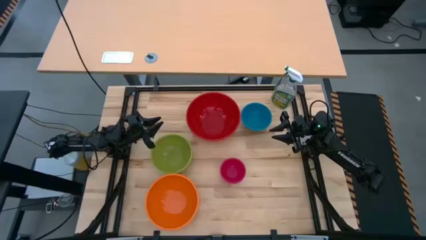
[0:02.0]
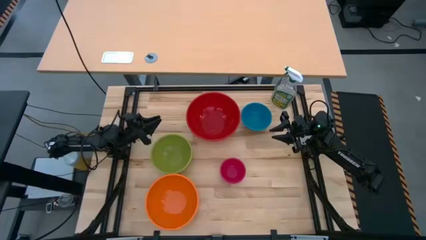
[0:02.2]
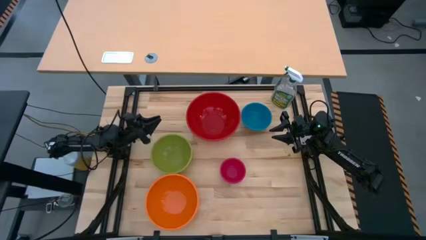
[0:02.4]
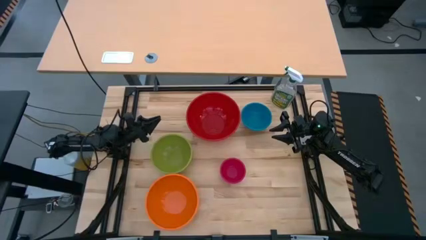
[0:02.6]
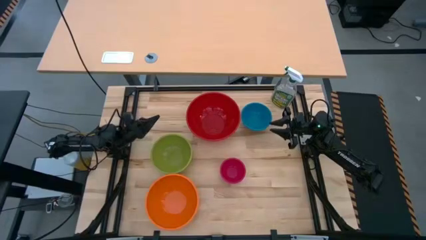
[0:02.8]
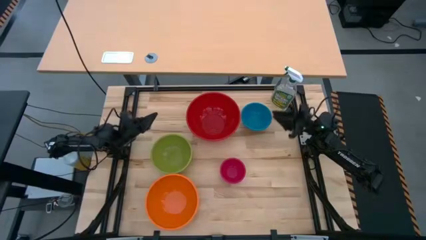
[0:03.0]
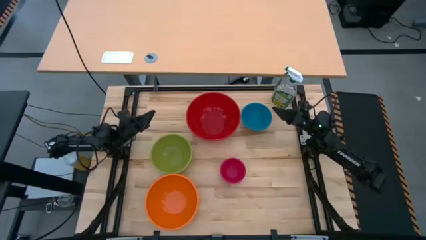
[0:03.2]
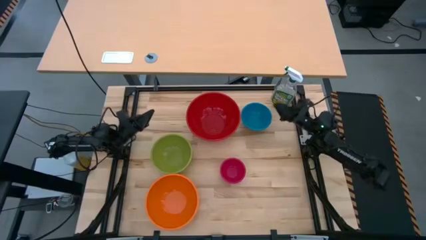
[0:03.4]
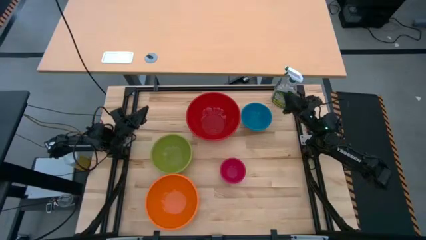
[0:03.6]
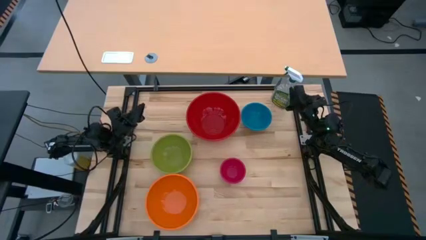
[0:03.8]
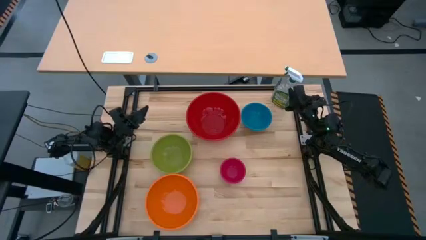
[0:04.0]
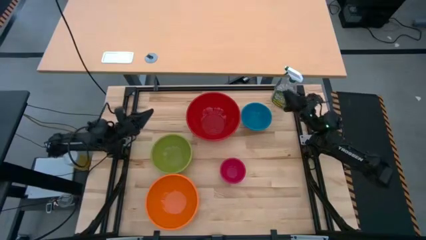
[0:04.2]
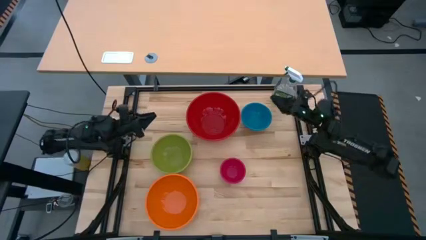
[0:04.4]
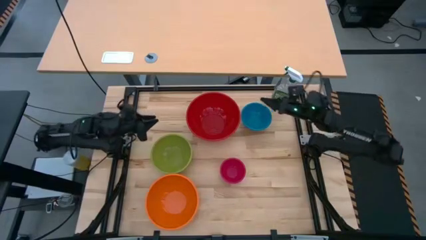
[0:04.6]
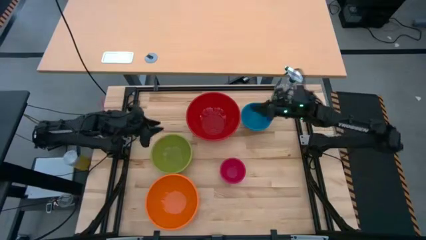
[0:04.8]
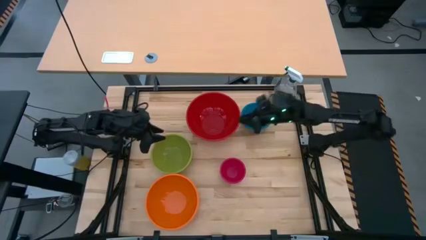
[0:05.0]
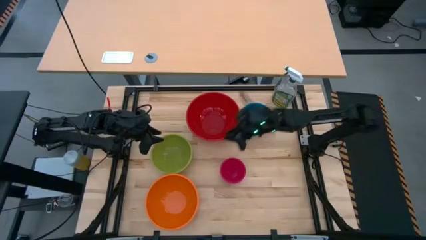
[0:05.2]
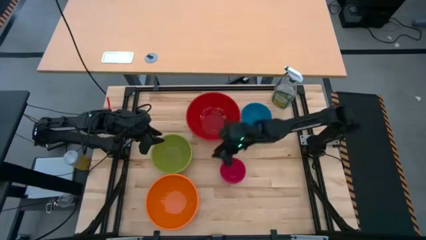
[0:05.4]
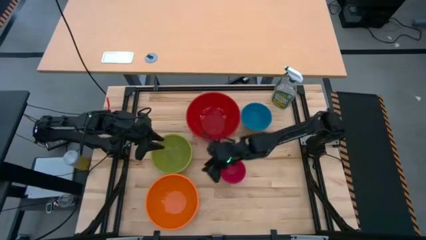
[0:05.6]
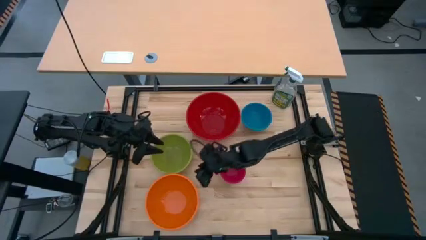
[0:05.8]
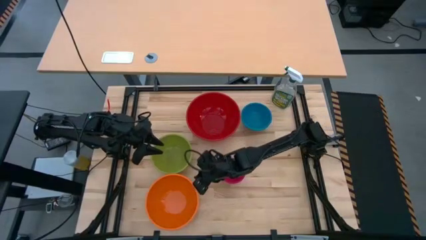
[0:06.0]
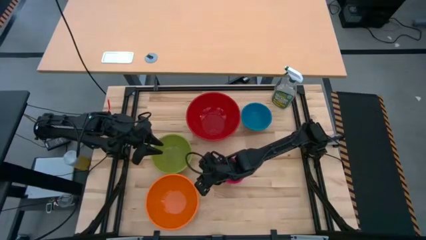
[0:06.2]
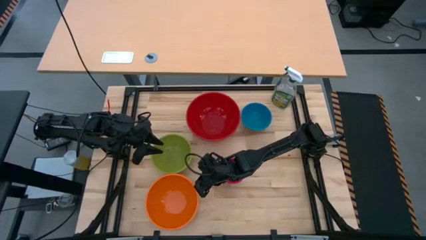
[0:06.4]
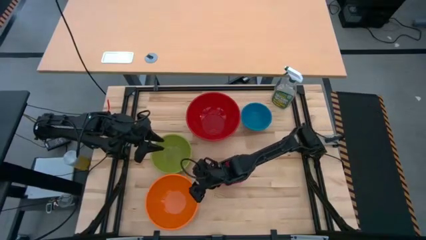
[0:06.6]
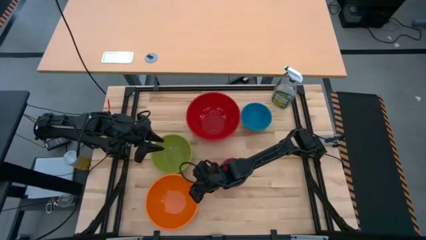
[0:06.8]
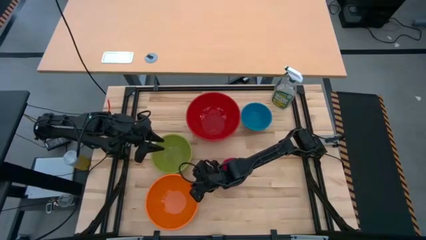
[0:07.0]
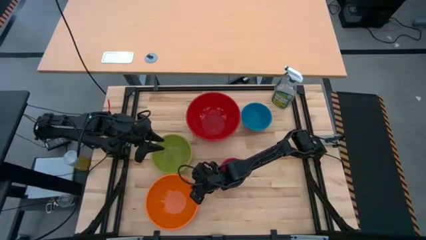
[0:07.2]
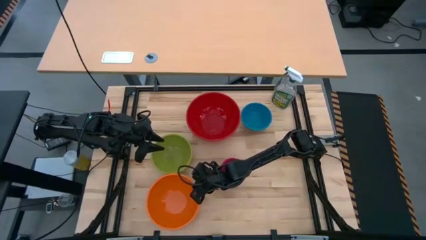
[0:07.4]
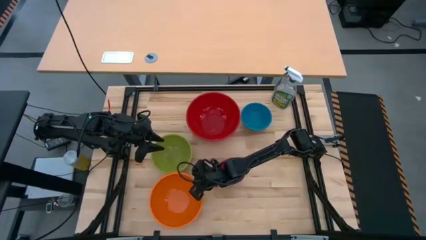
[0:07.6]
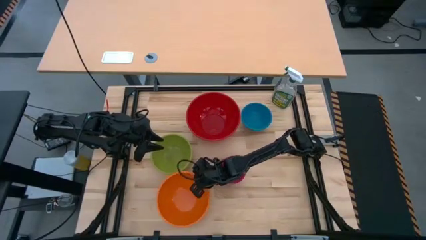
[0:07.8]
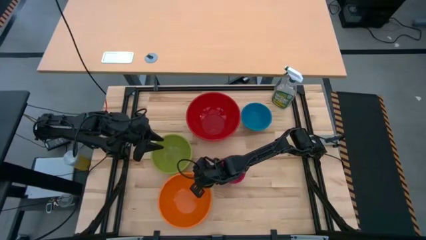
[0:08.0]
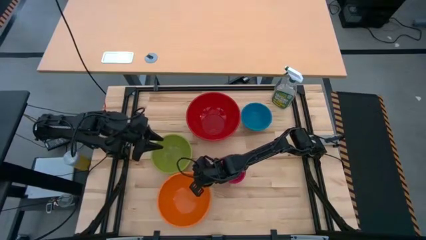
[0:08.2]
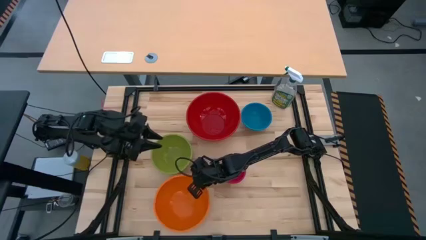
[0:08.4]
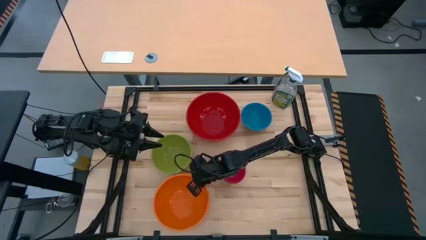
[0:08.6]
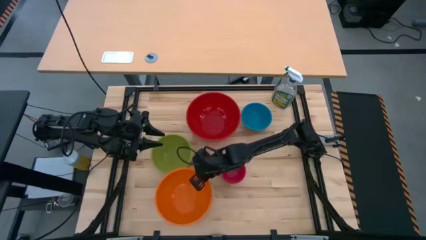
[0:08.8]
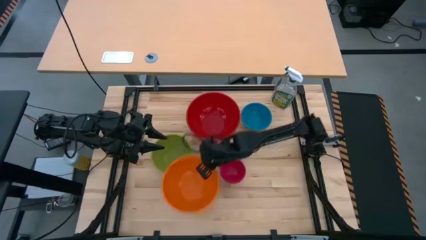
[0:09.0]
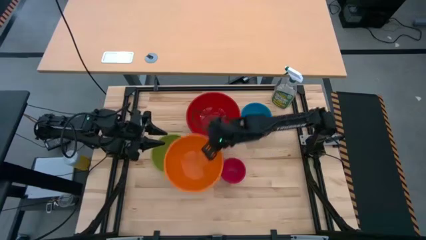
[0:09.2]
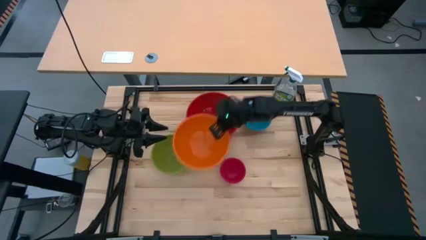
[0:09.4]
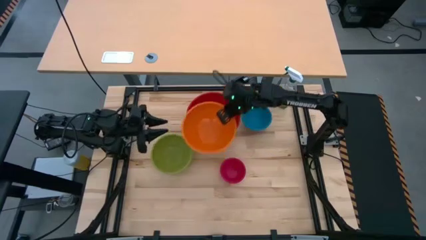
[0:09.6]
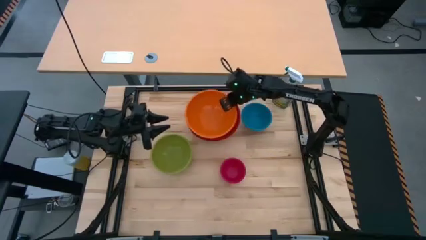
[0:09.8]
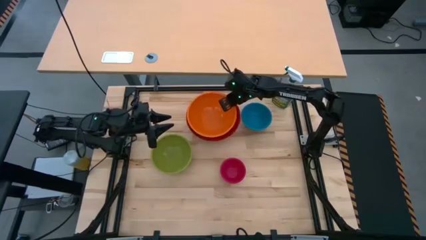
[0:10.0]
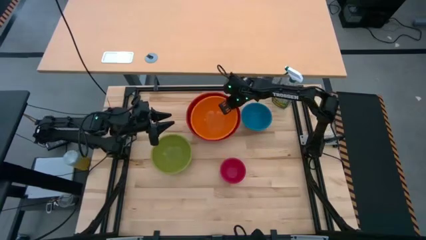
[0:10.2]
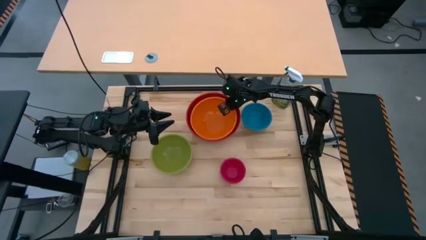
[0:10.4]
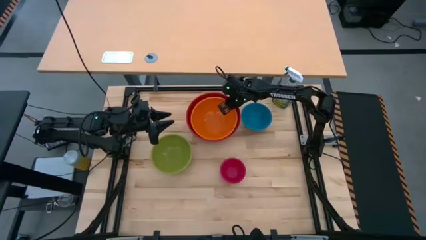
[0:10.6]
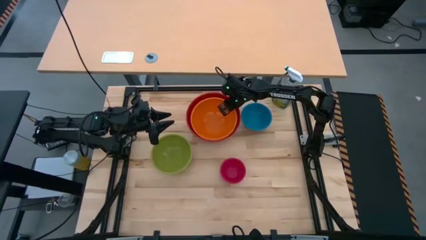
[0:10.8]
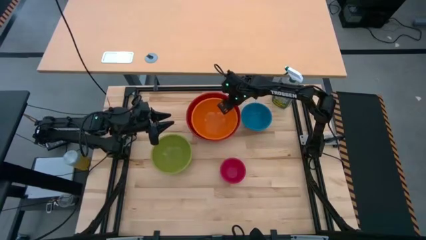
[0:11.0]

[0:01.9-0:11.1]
Stack the orange bowl on top of the red bowl

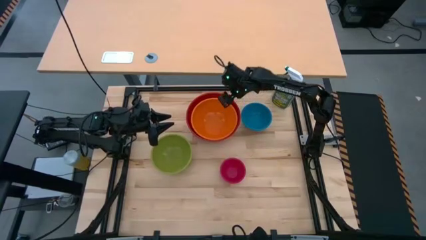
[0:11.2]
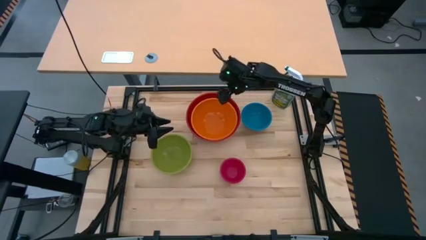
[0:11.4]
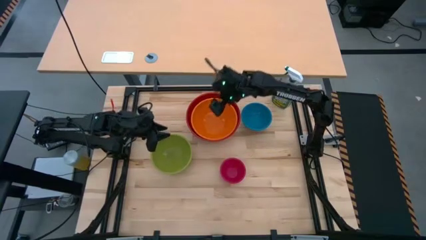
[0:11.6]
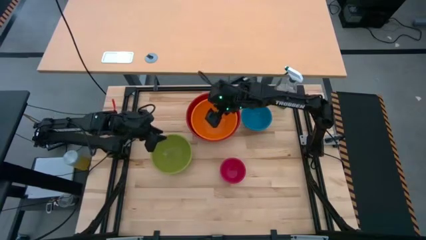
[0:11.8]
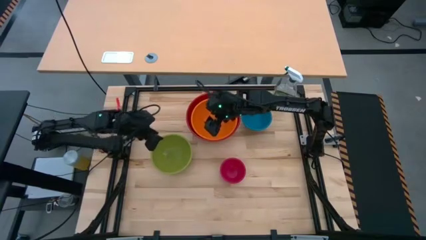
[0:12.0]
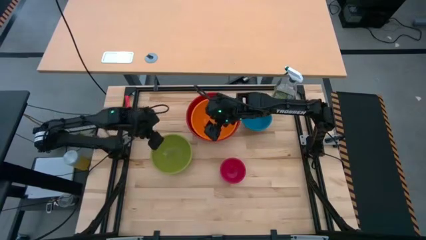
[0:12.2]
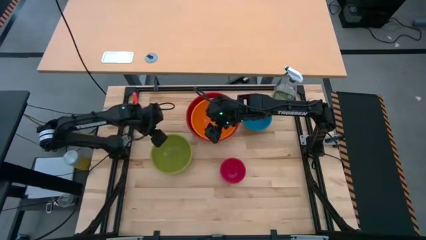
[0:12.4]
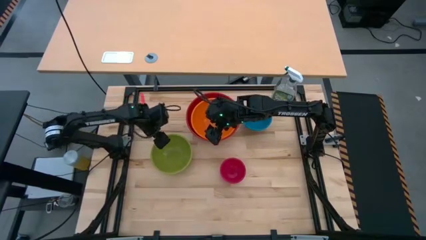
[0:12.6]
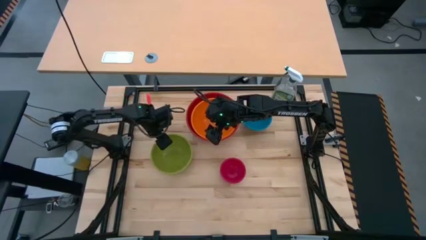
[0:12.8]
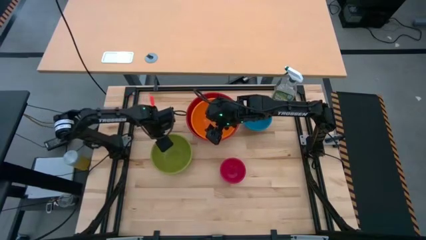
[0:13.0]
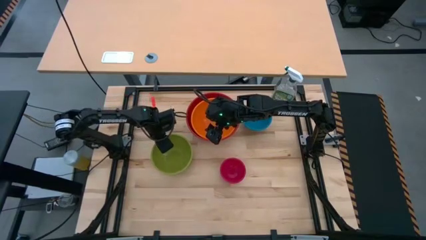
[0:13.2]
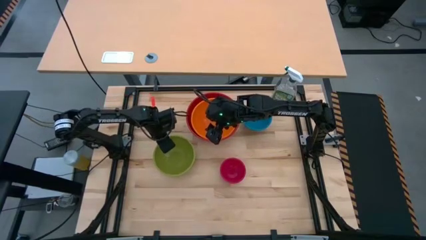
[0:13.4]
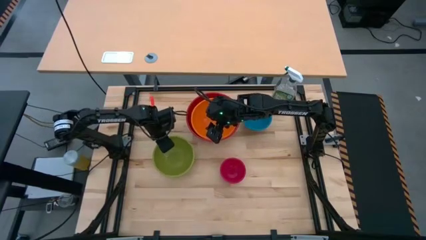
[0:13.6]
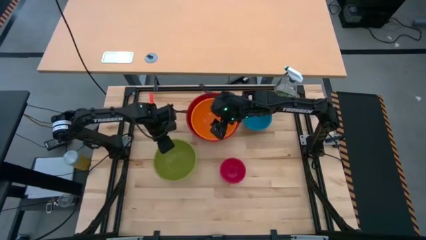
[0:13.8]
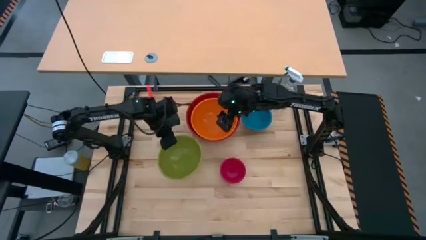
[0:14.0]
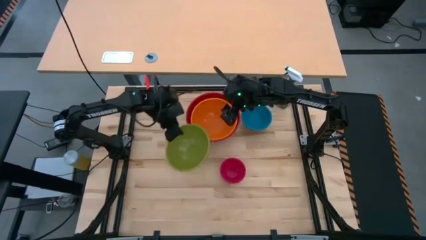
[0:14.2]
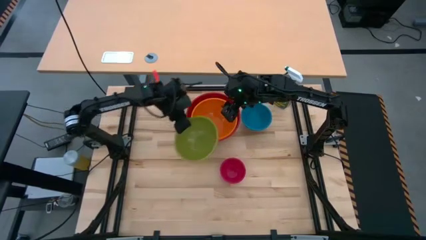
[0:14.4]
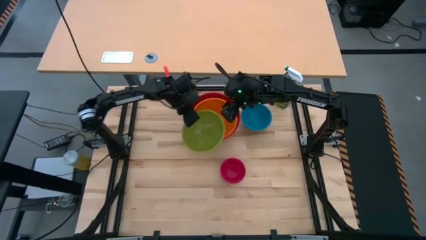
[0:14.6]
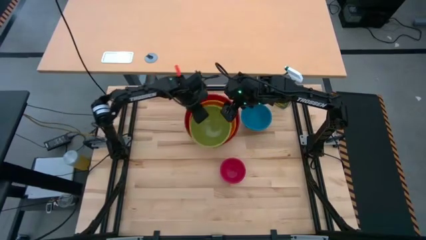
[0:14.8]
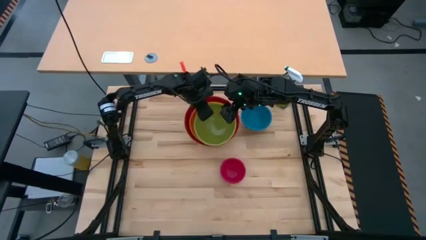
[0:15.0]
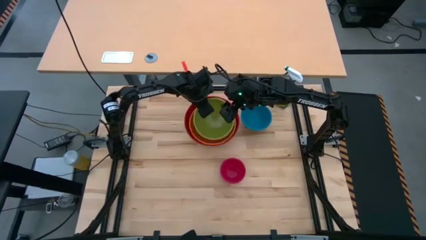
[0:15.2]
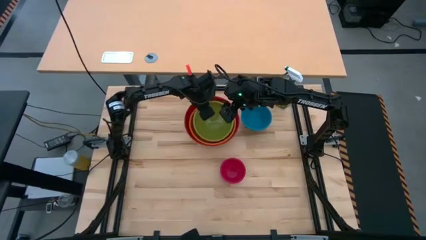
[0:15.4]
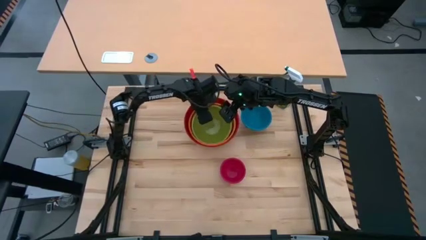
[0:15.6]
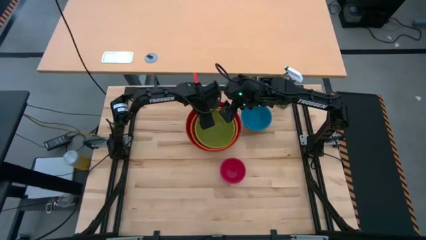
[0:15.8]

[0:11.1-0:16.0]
Stack the green bowl on top of the orange bowl

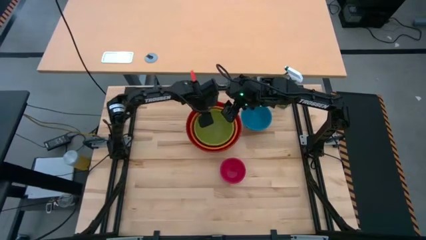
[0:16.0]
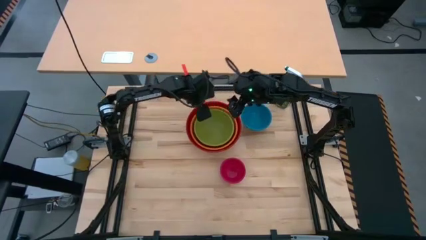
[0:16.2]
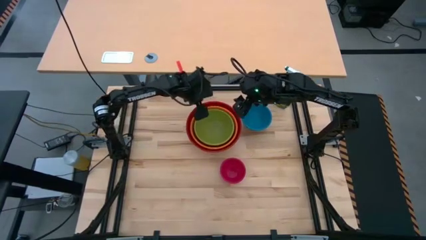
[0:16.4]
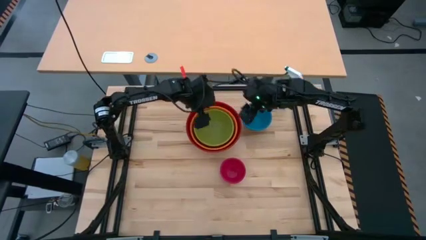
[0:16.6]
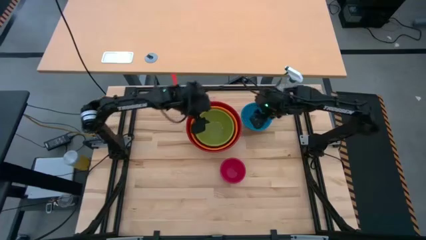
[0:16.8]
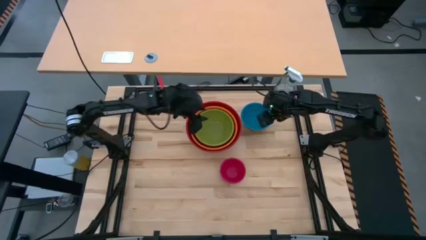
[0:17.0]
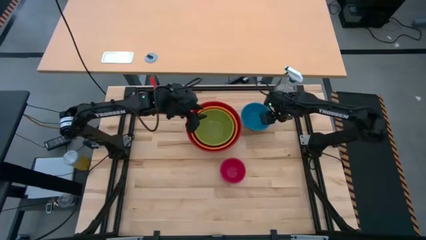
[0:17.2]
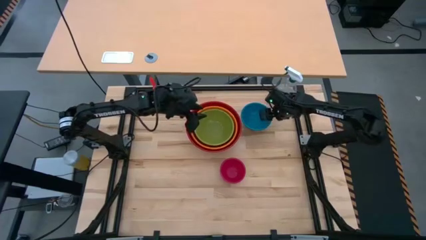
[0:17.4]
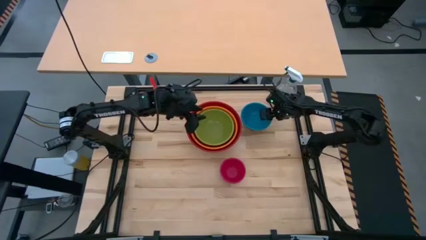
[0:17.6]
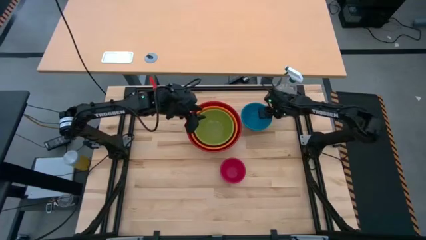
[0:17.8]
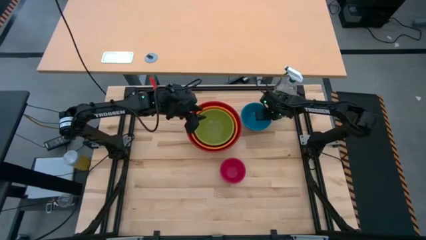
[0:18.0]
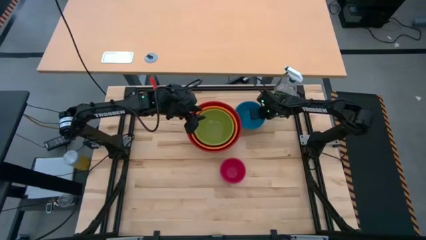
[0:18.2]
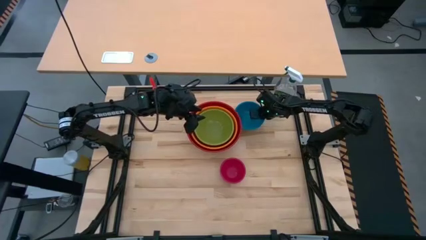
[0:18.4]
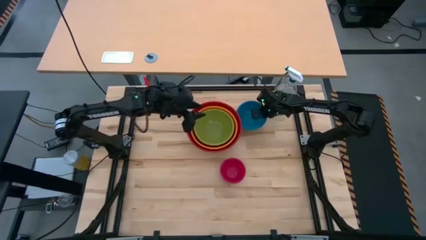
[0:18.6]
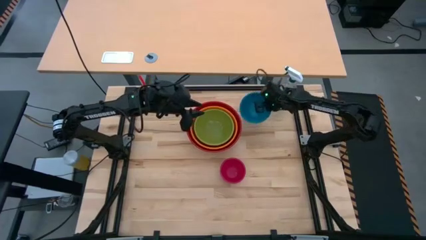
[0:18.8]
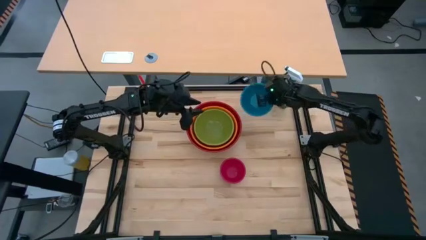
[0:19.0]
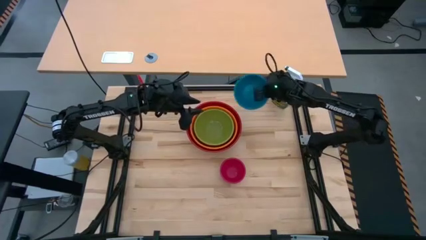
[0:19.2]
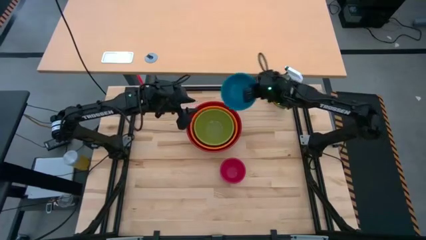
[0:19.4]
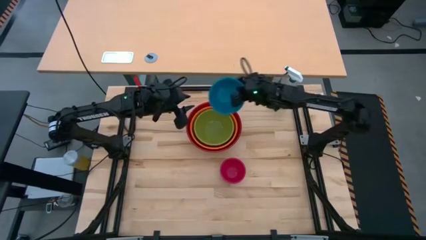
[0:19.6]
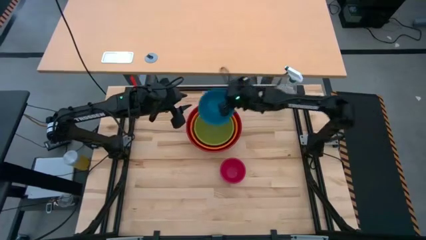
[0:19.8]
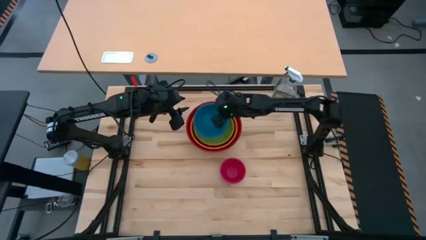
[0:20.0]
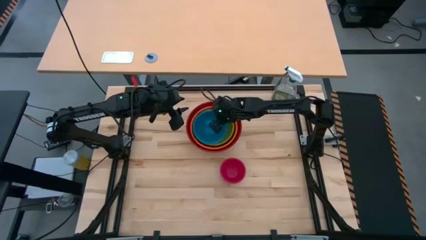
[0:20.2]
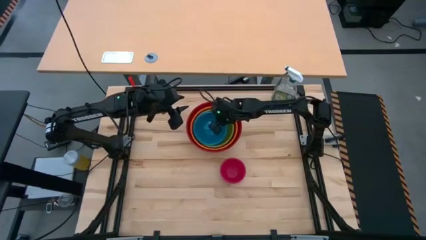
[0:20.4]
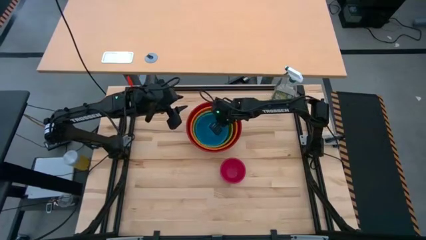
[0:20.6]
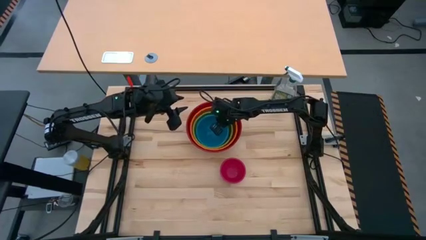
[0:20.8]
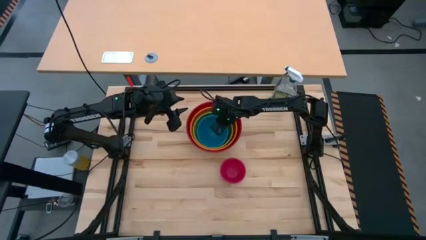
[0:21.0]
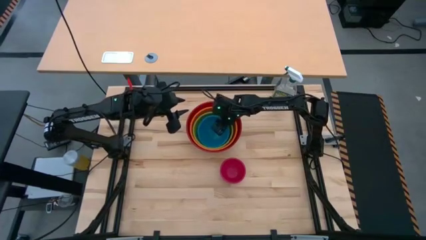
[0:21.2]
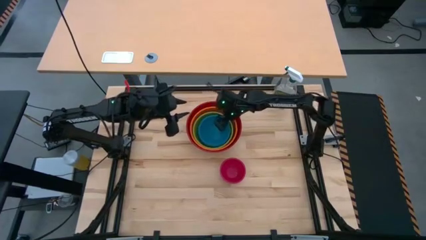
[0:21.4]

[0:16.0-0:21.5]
Stack the blue bowl on top of the green bowl
